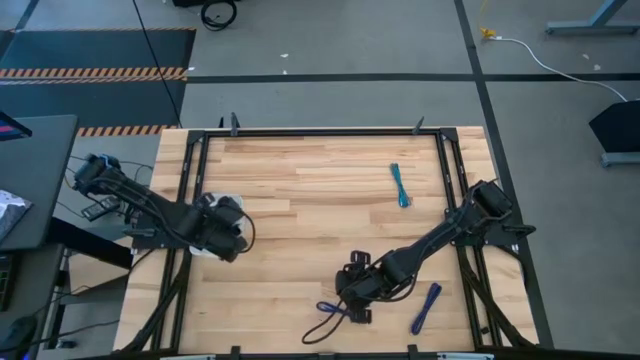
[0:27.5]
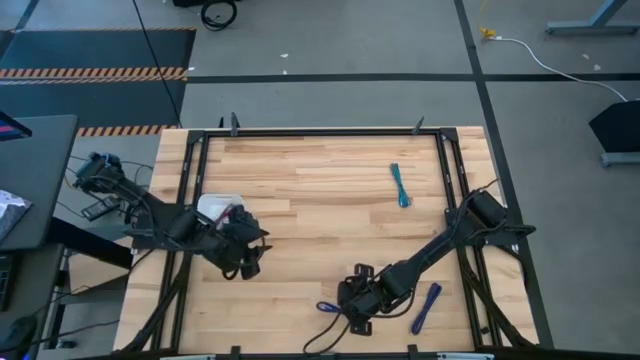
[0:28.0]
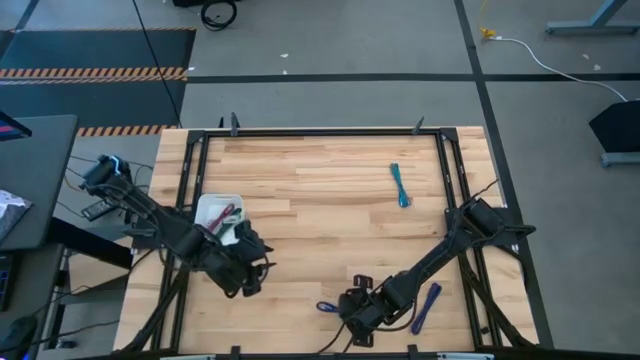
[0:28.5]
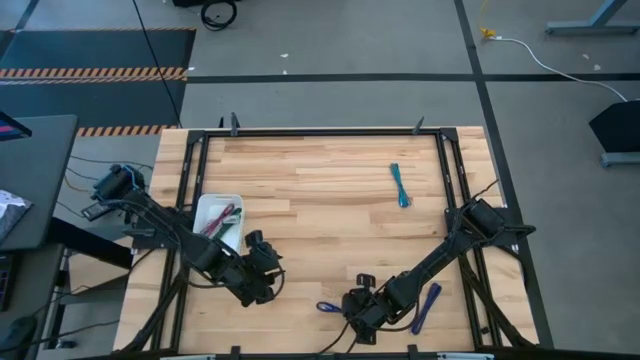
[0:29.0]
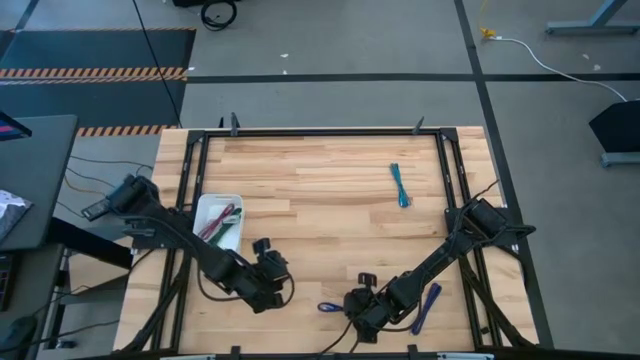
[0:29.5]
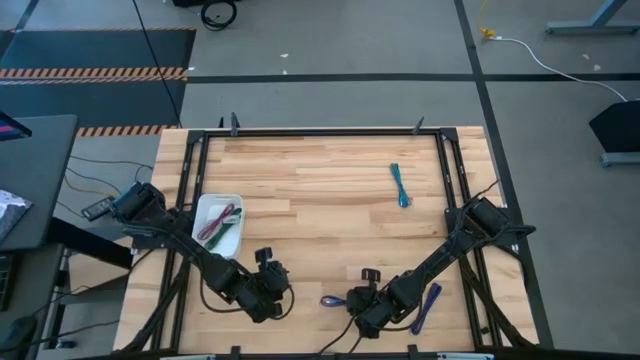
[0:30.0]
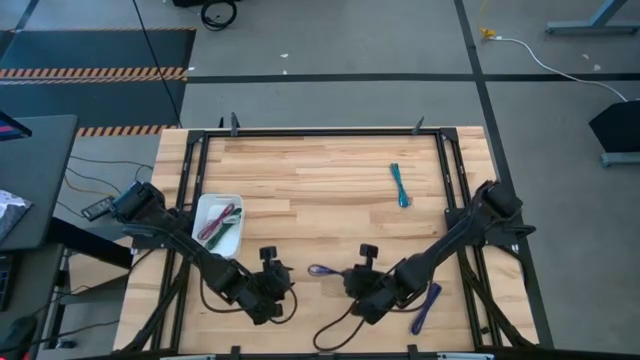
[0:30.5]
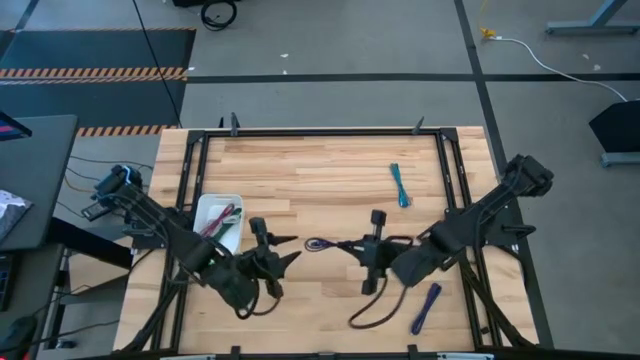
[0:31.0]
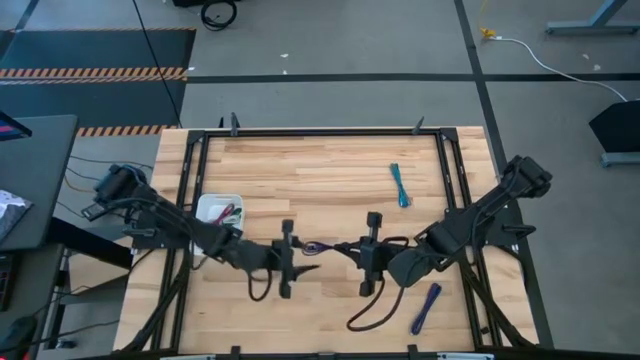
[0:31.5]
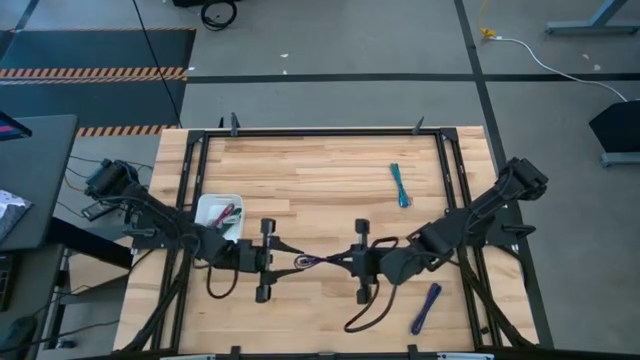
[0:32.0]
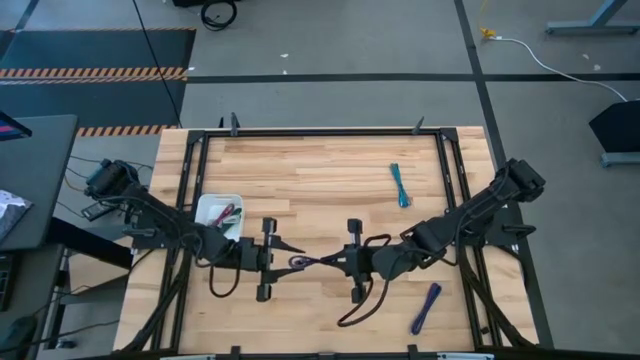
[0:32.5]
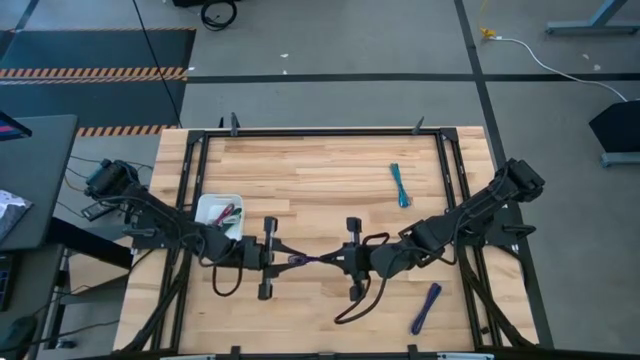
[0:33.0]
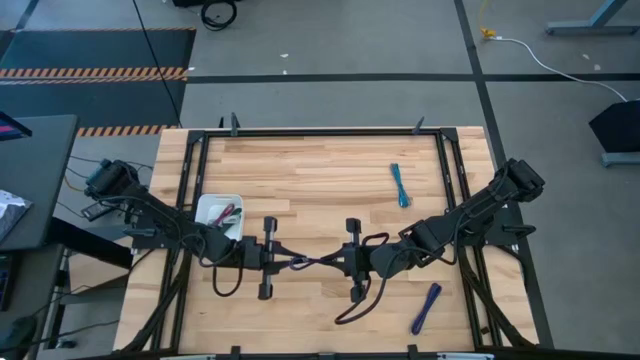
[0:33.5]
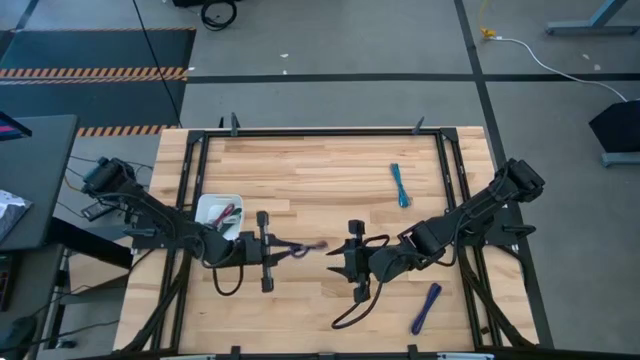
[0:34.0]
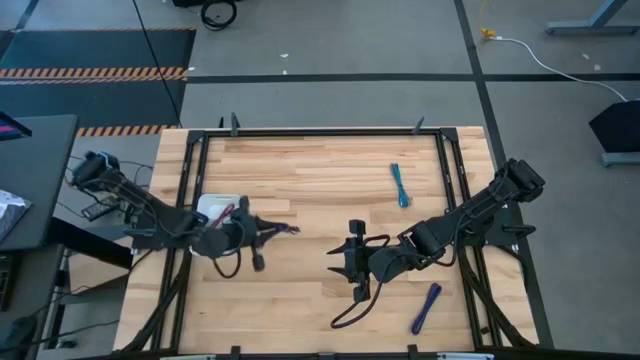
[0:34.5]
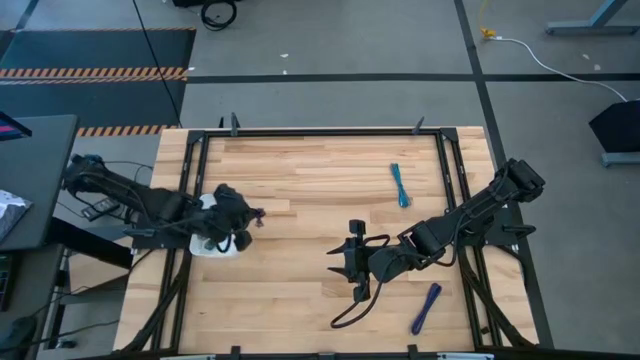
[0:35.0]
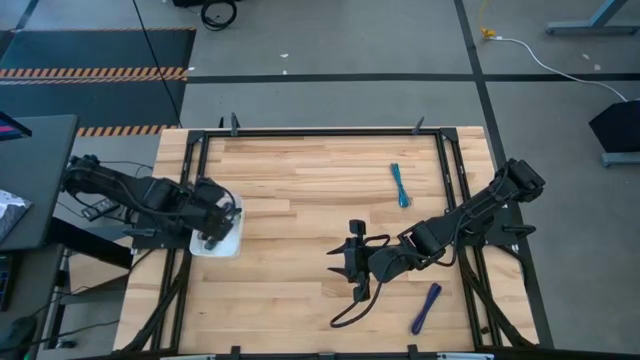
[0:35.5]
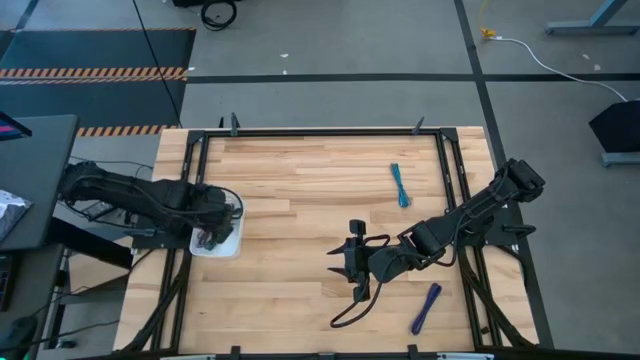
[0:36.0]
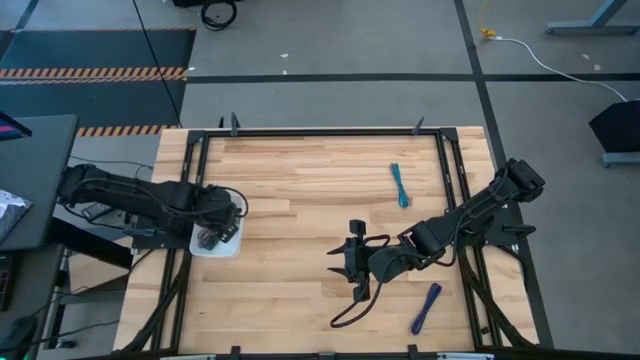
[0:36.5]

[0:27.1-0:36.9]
Task: Pick and place USB-C Cables
Put the violet charger cable into the white bin

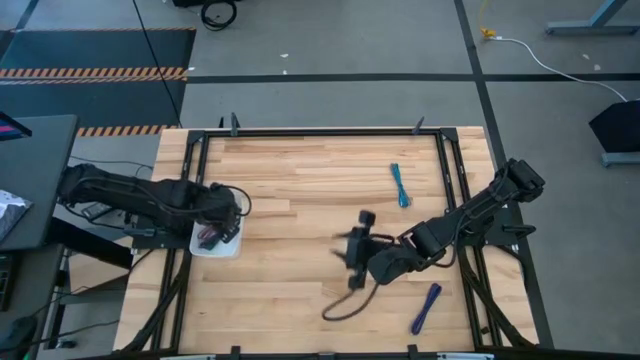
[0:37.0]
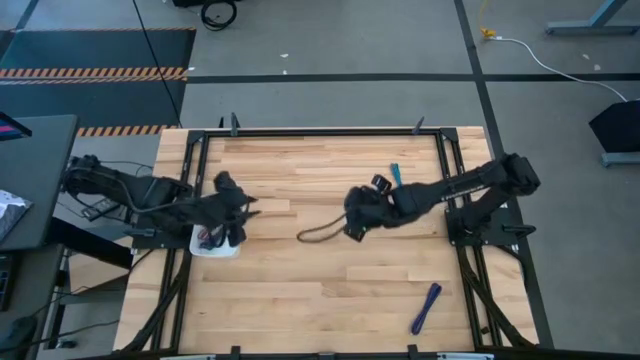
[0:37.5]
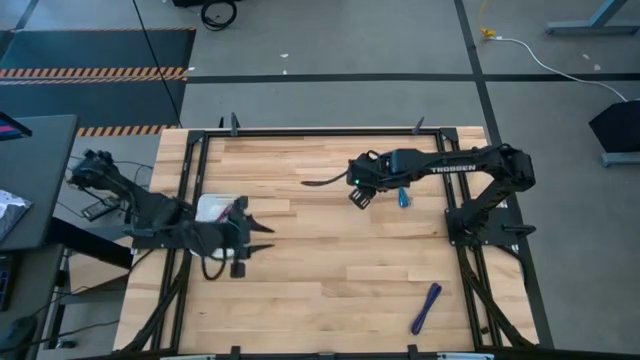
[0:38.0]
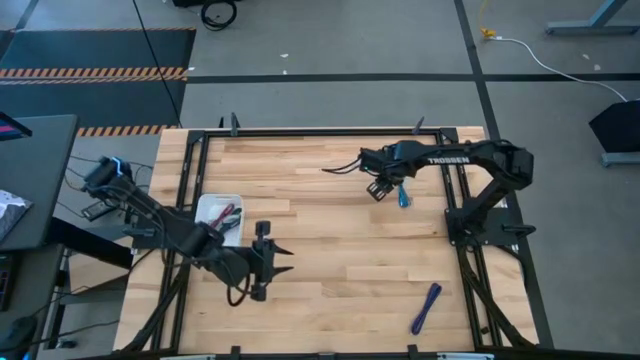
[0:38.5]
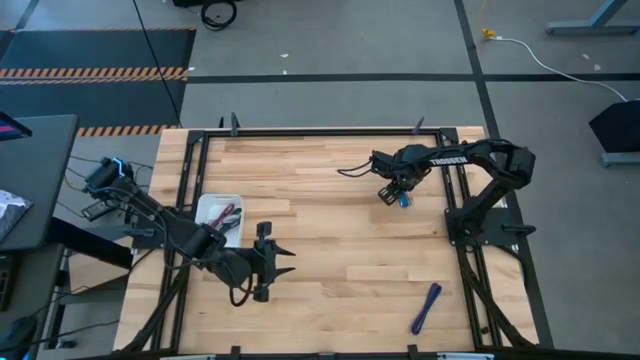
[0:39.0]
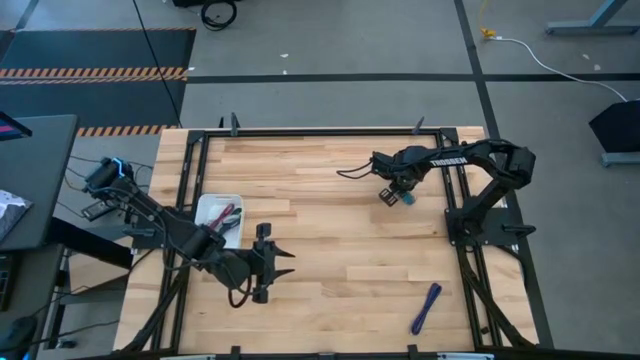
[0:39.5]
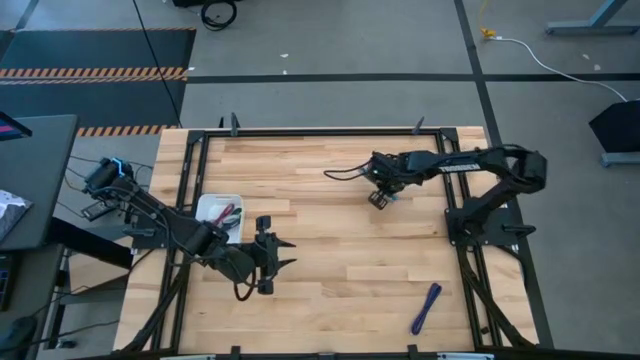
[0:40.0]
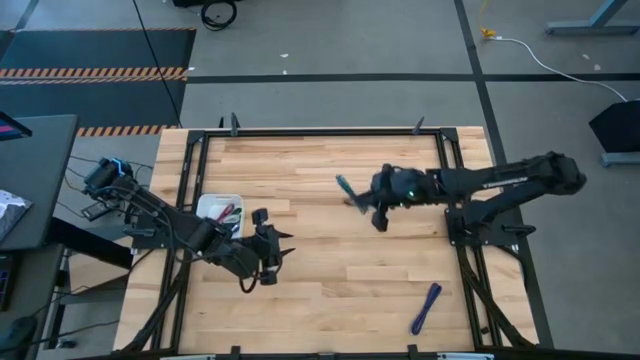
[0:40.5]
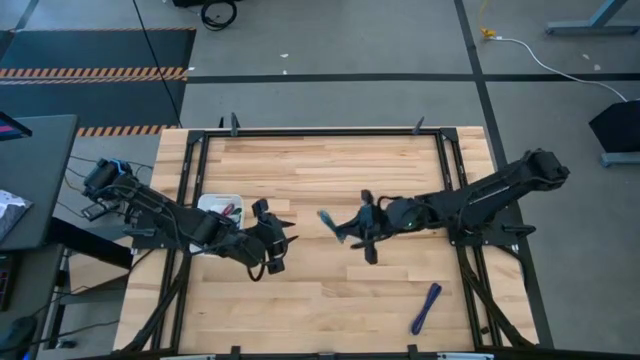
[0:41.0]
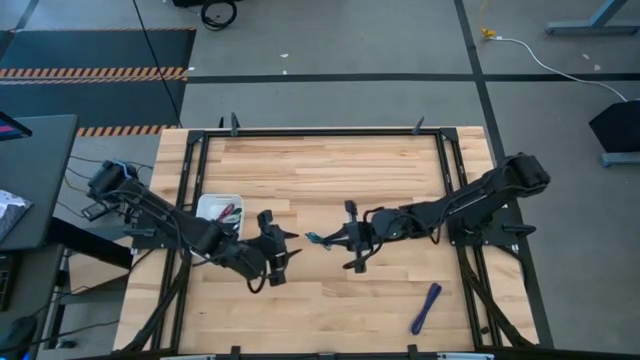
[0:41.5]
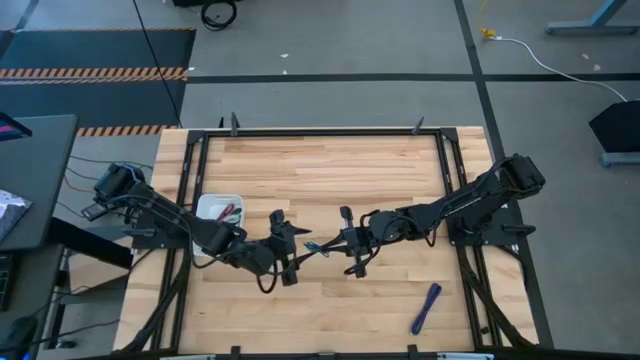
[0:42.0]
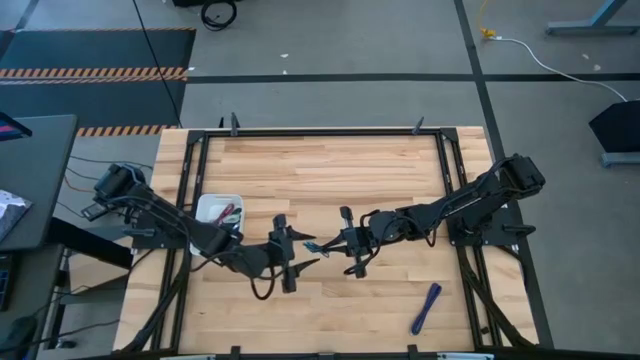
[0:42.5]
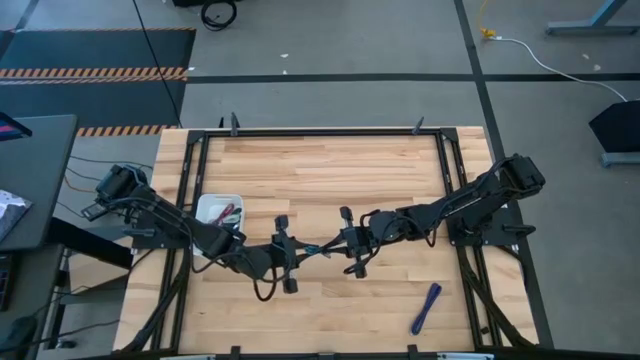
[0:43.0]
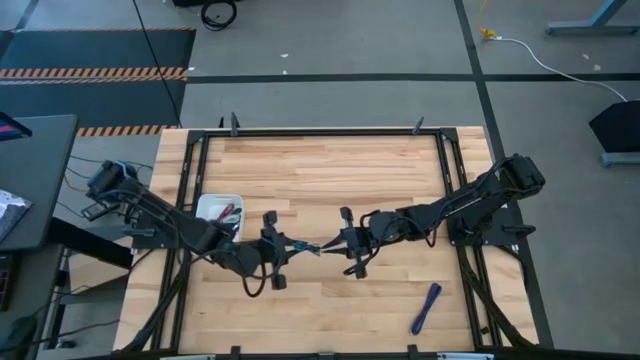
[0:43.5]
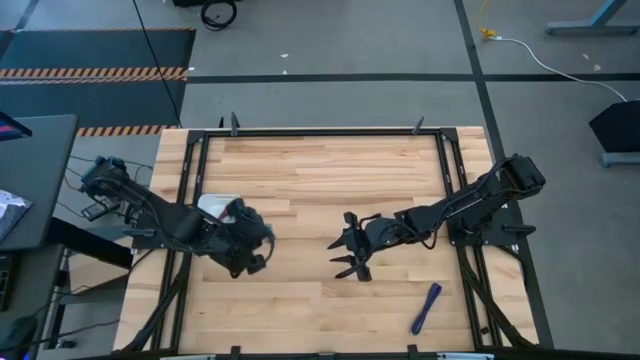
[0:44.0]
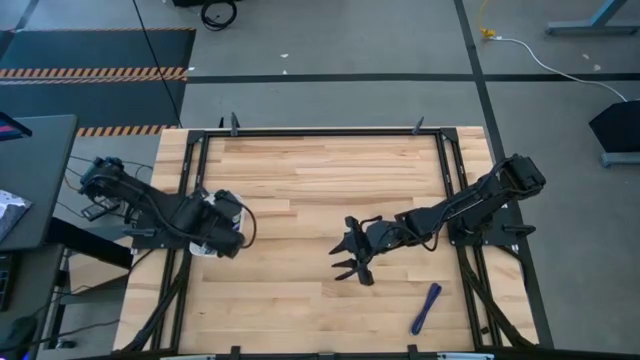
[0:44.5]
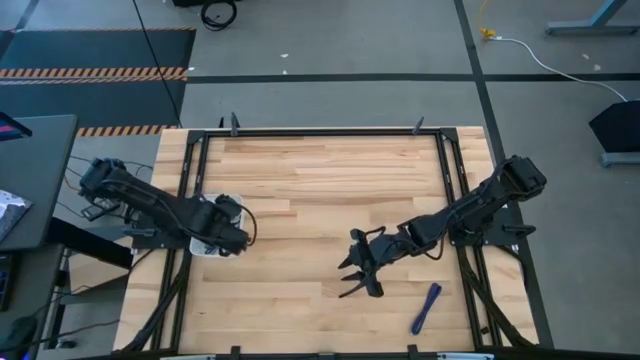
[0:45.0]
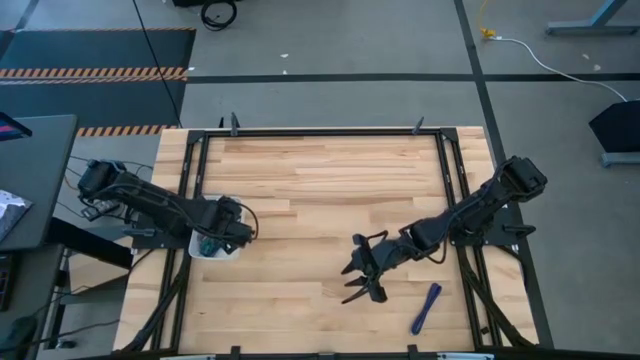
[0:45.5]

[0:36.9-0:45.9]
Put the blue charger cable into the white bin

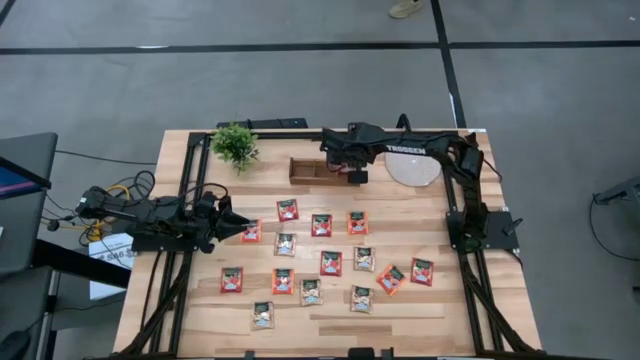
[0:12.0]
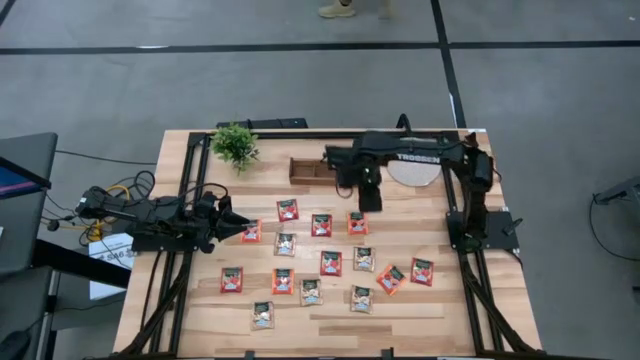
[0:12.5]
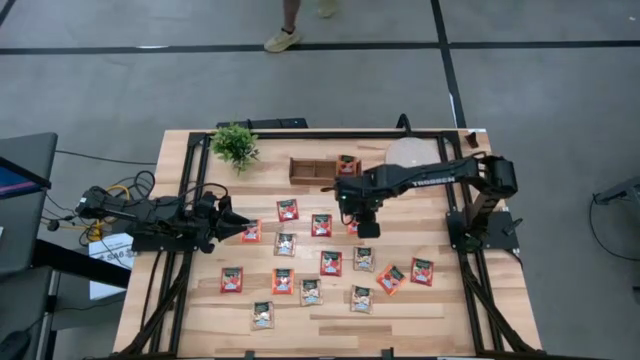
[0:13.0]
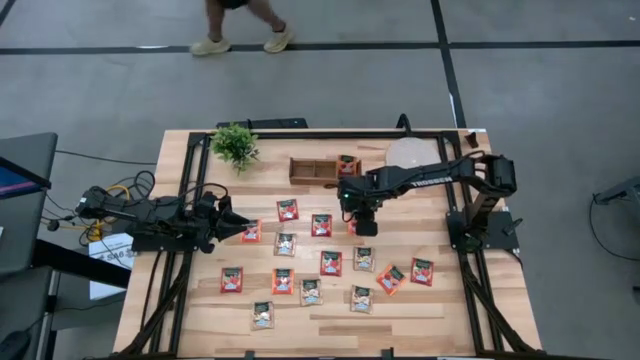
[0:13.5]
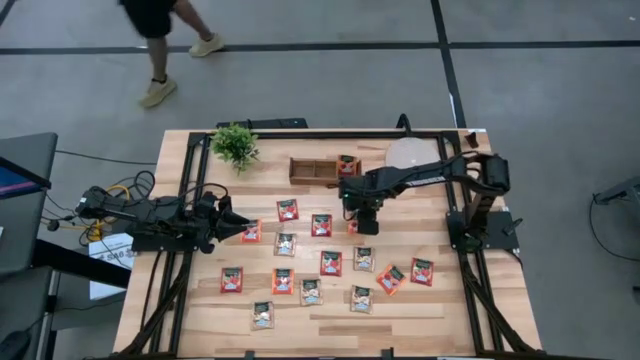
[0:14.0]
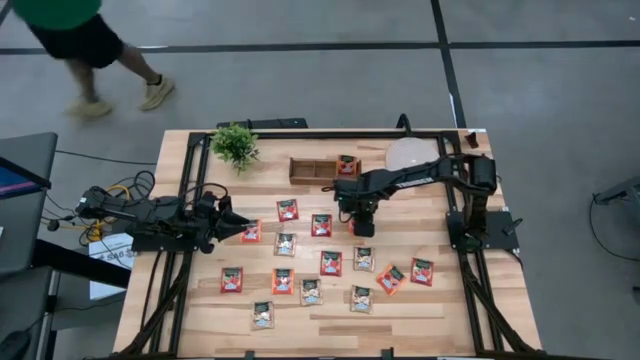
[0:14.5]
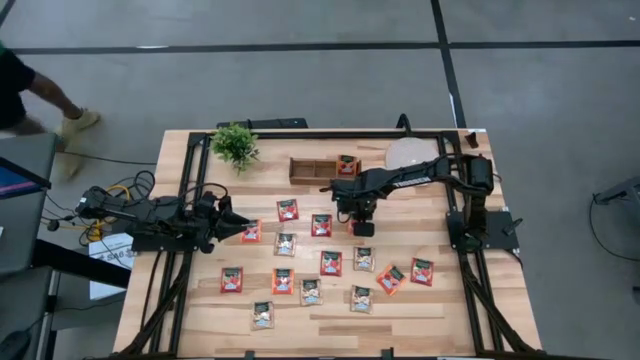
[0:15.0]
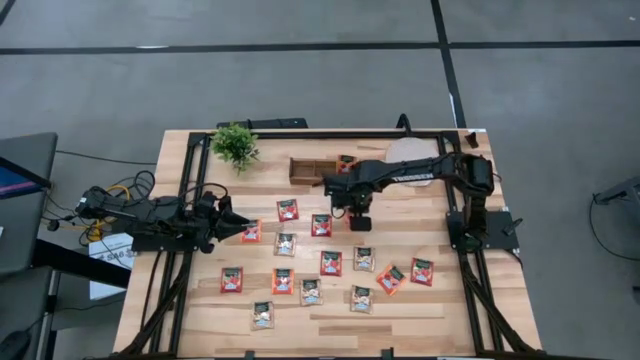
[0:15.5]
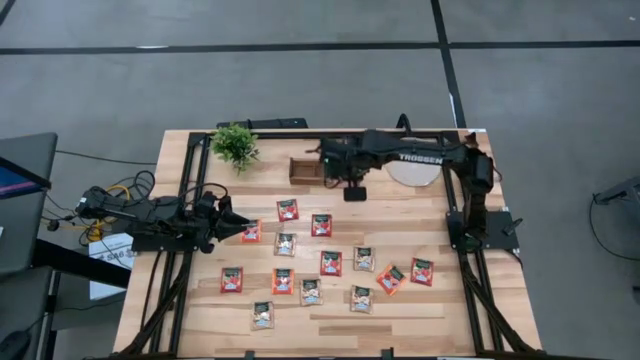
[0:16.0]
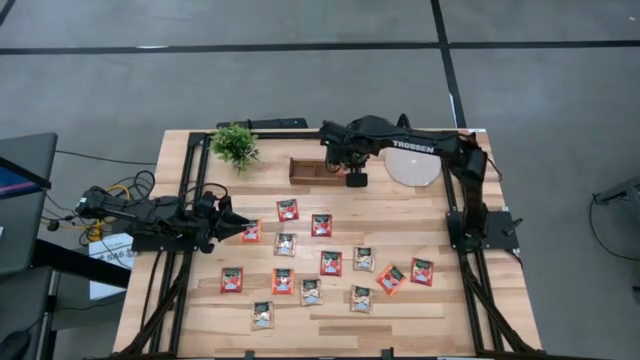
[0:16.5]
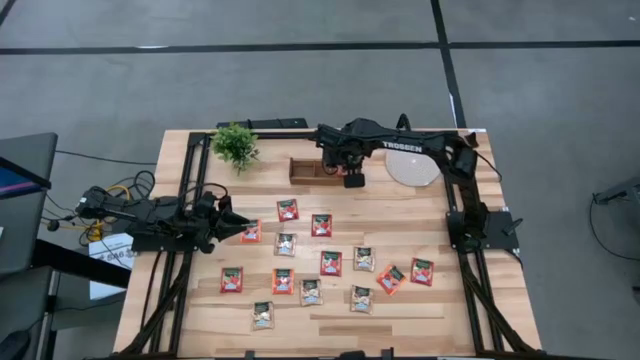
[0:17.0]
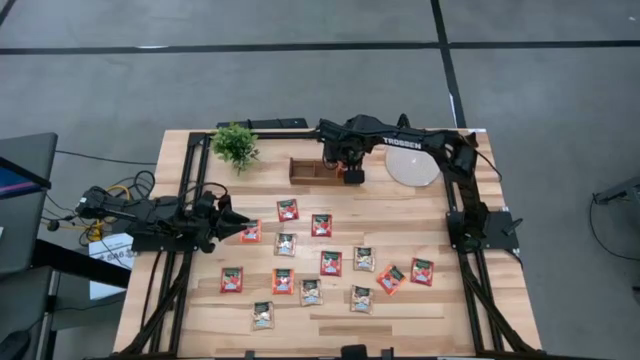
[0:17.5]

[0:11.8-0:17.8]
Task: Pick & Place Tea
Put the orange tea bag into the right section of the wooden organizer
